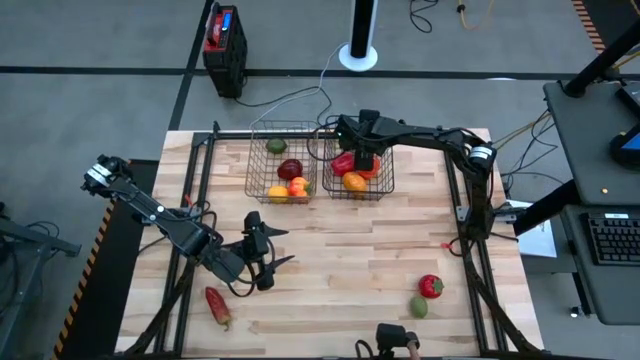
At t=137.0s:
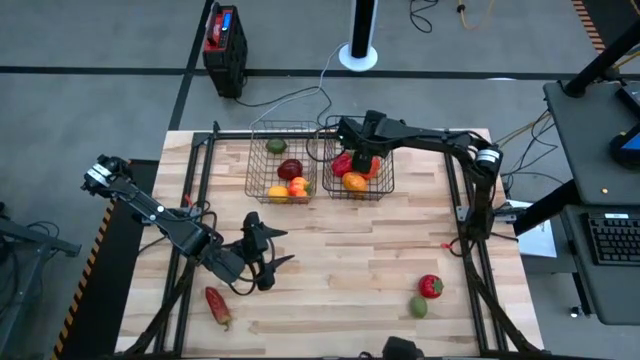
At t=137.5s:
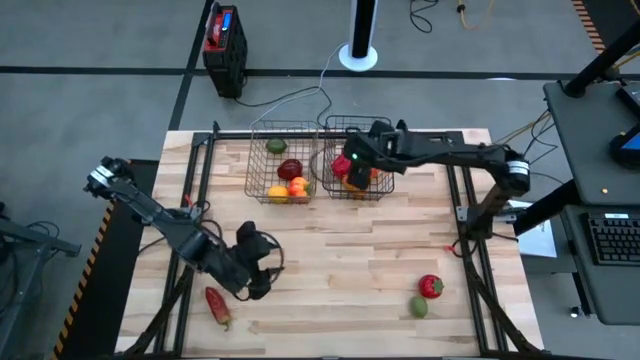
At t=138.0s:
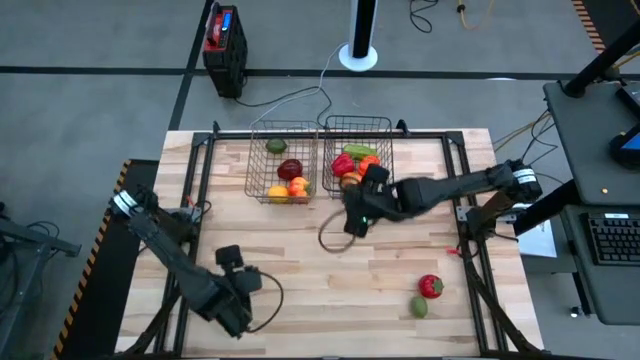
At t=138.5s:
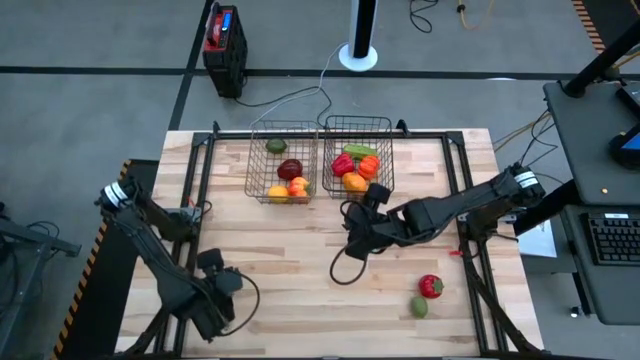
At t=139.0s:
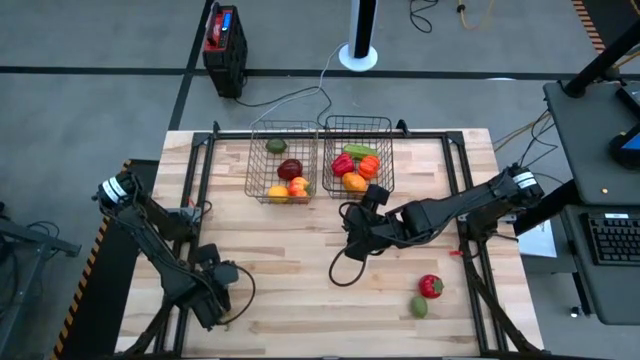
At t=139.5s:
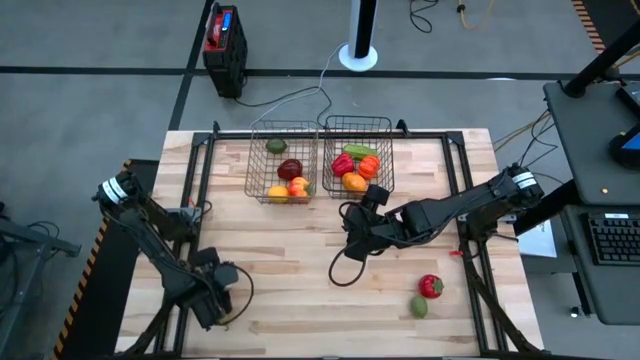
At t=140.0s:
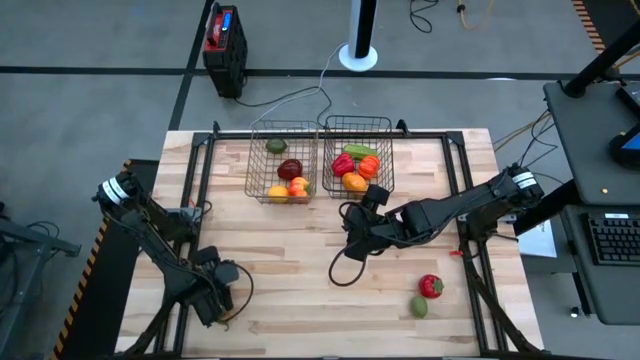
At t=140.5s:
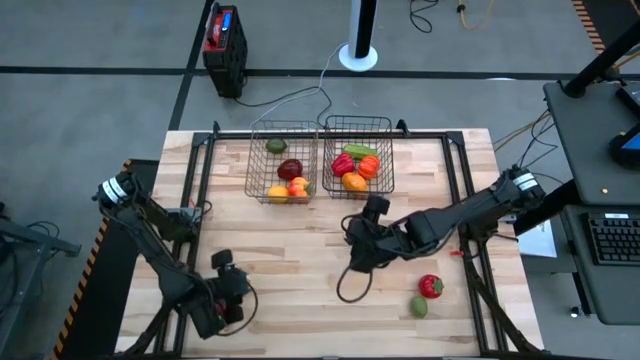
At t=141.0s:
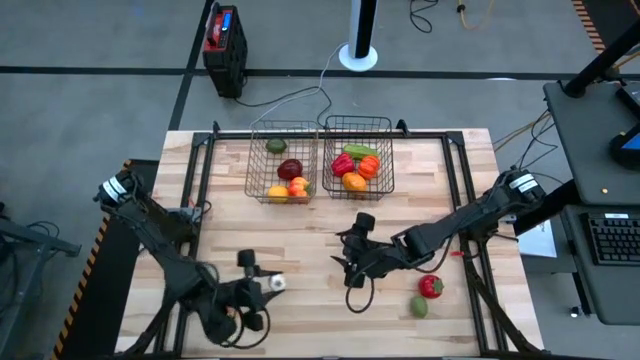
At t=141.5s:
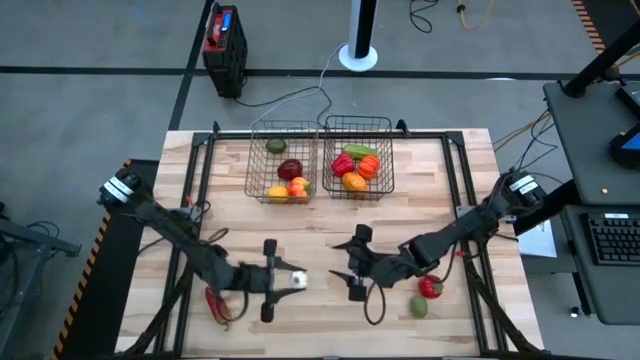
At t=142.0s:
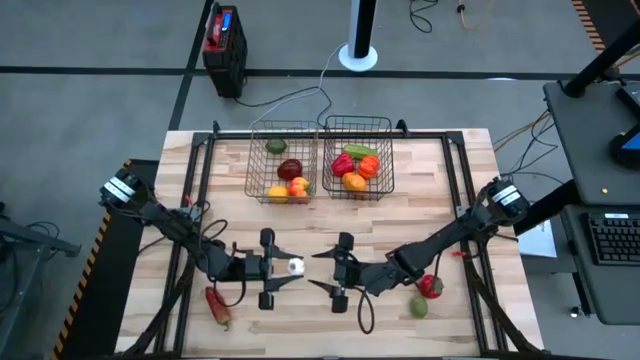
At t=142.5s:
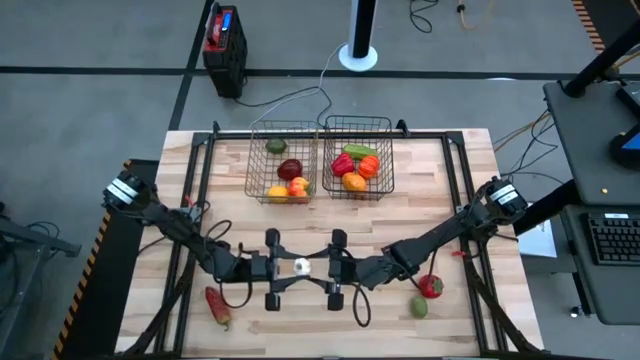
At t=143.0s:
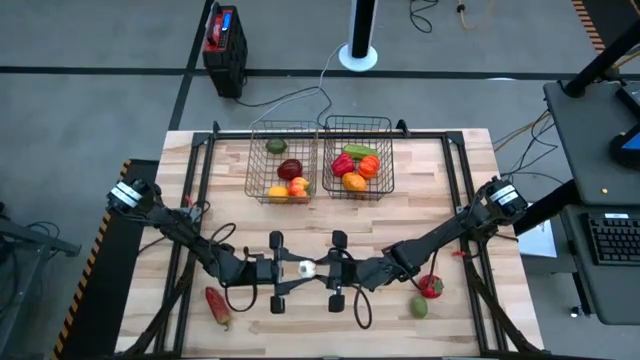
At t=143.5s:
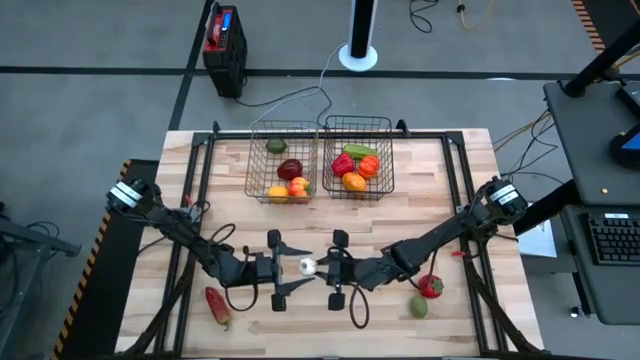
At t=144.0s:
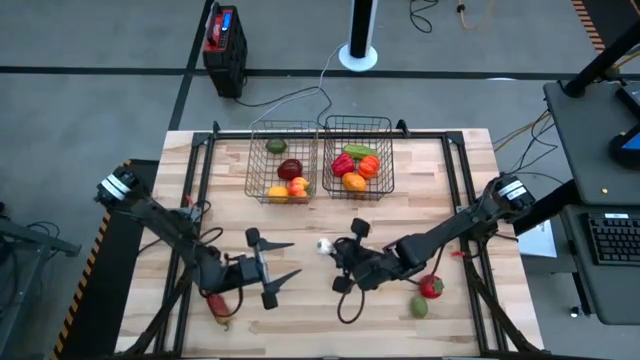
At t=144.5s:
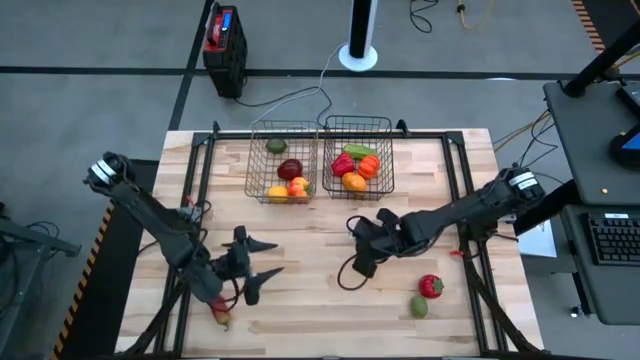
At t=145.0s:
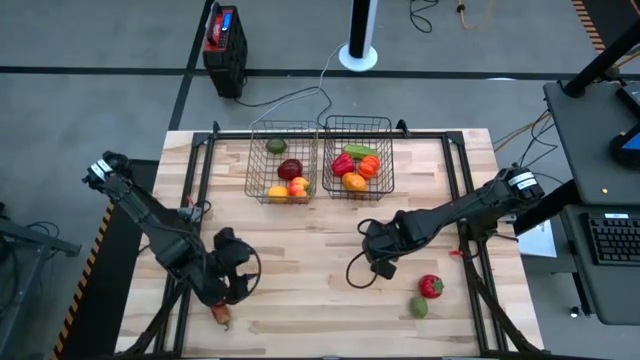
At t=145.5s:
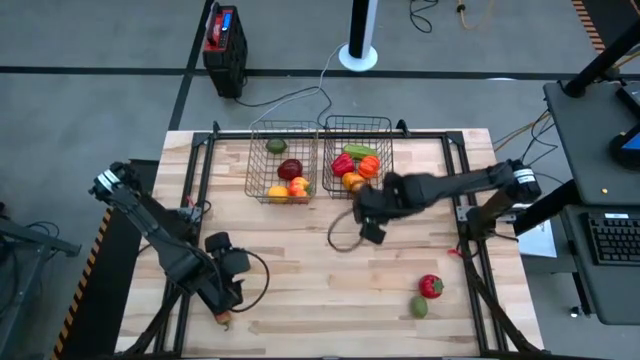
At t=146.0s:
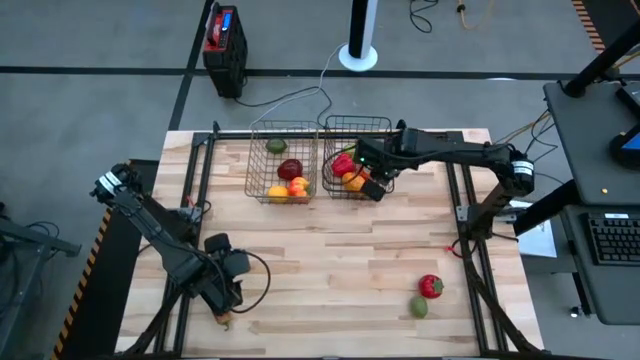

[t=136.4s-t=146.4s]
Task: Sort produce into baskets
Put the white garlic into the black wire basket

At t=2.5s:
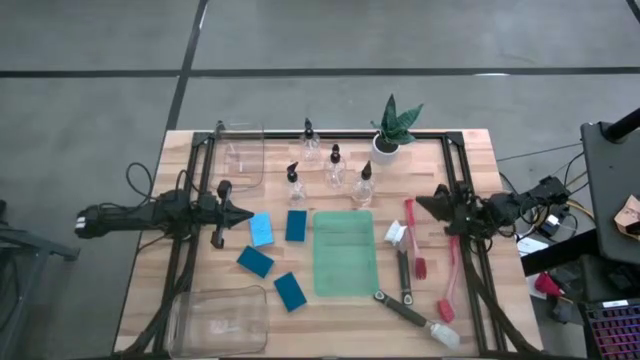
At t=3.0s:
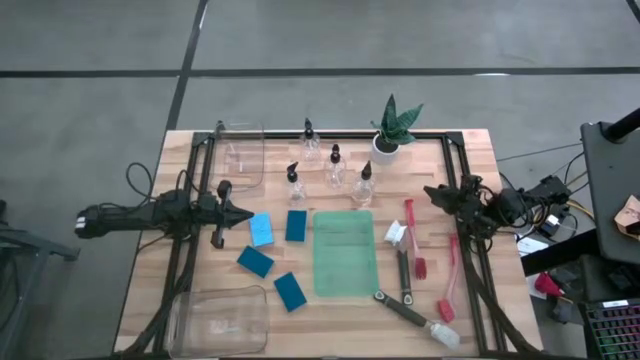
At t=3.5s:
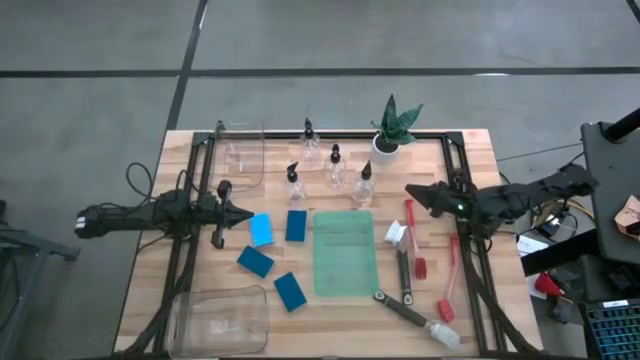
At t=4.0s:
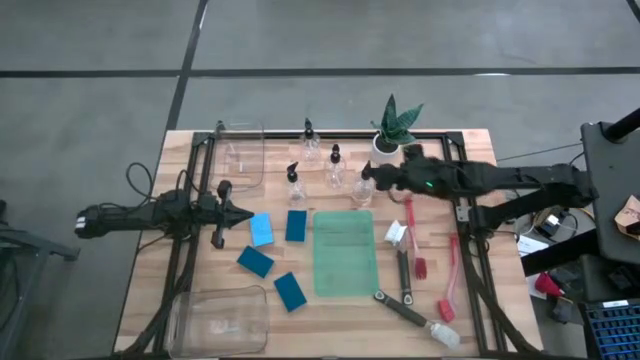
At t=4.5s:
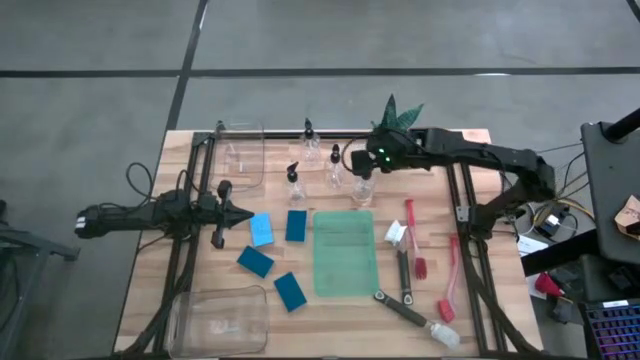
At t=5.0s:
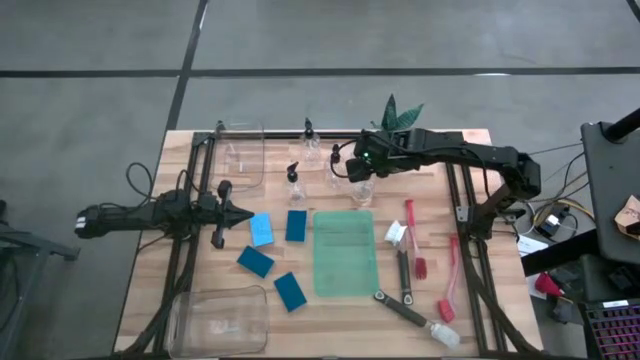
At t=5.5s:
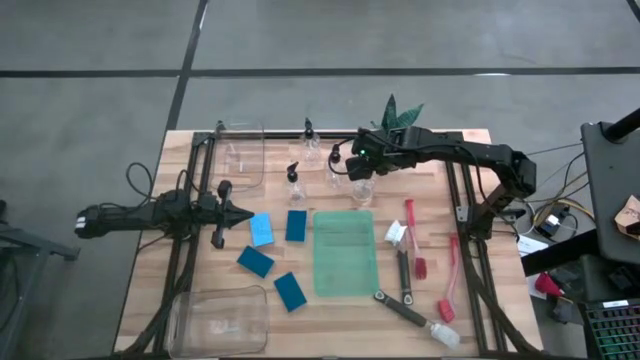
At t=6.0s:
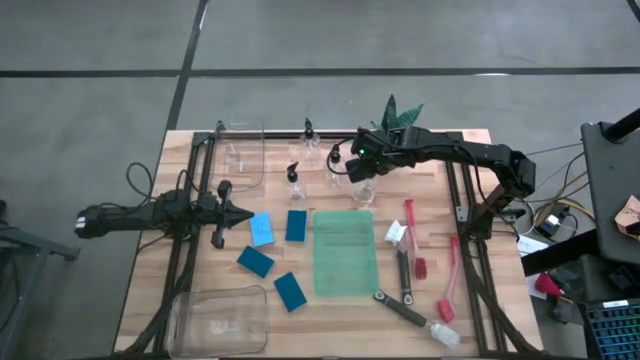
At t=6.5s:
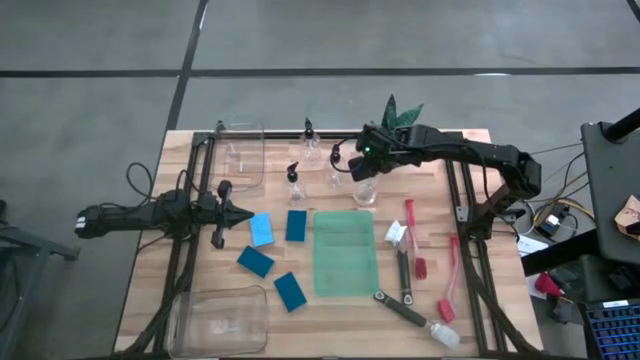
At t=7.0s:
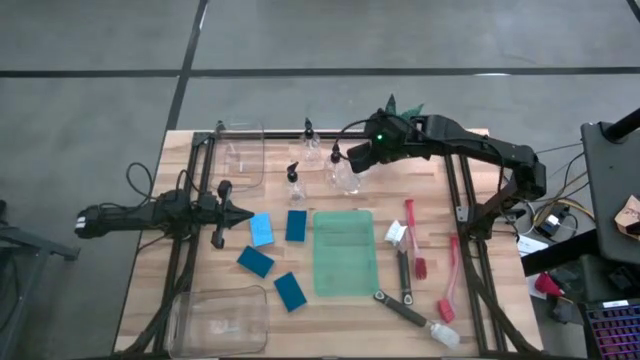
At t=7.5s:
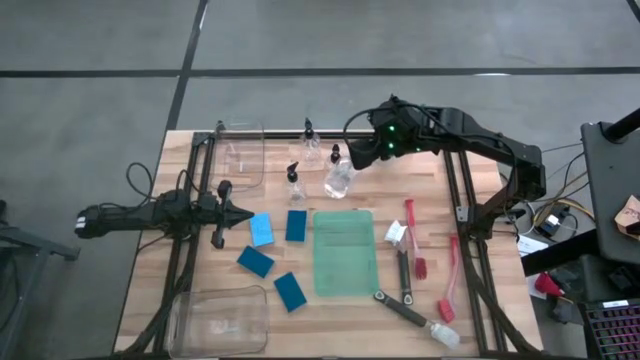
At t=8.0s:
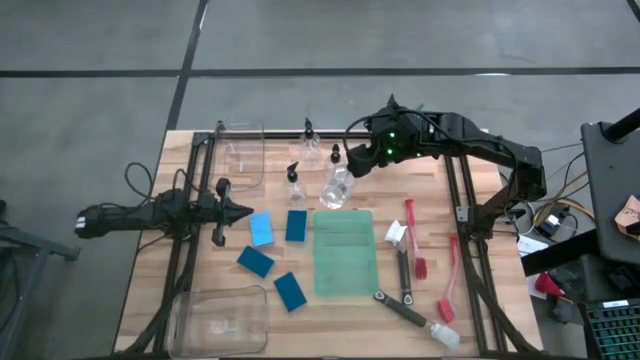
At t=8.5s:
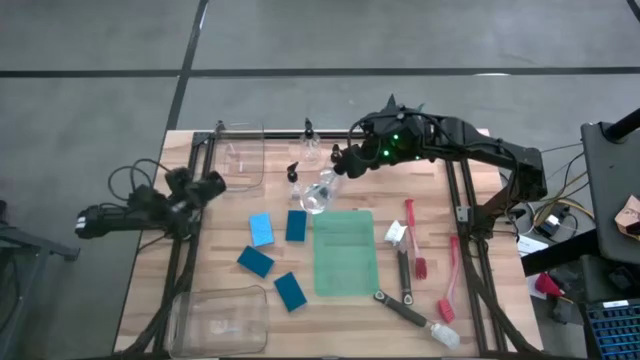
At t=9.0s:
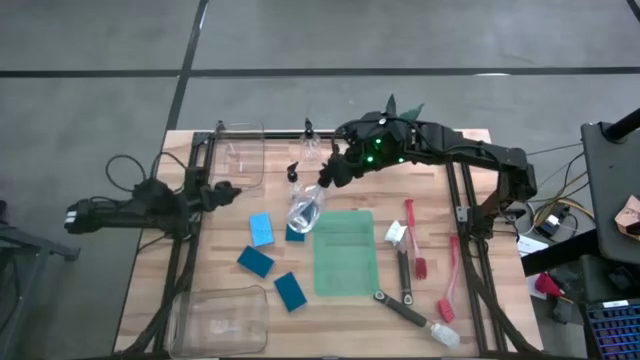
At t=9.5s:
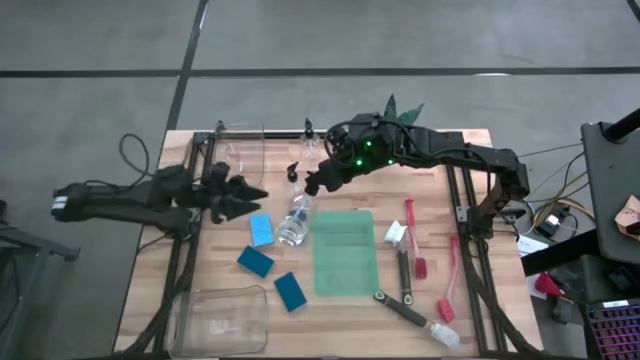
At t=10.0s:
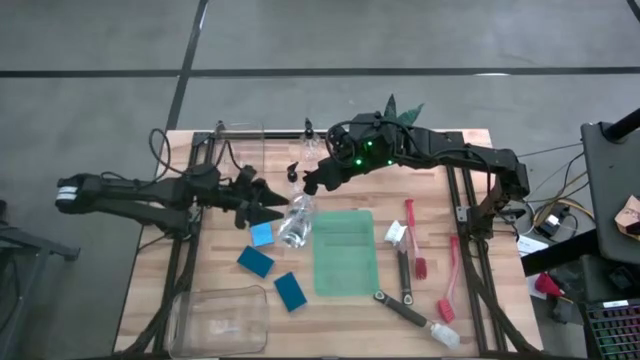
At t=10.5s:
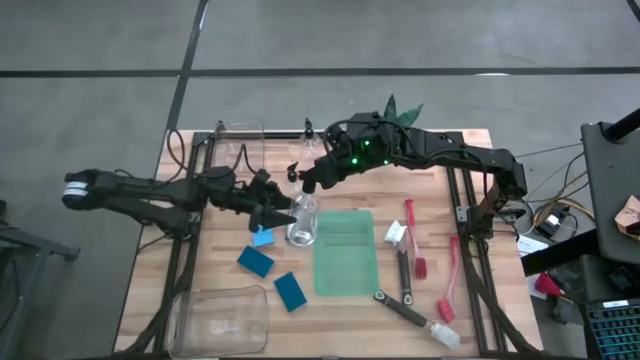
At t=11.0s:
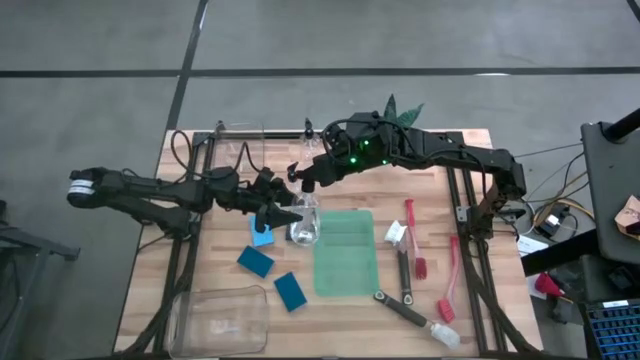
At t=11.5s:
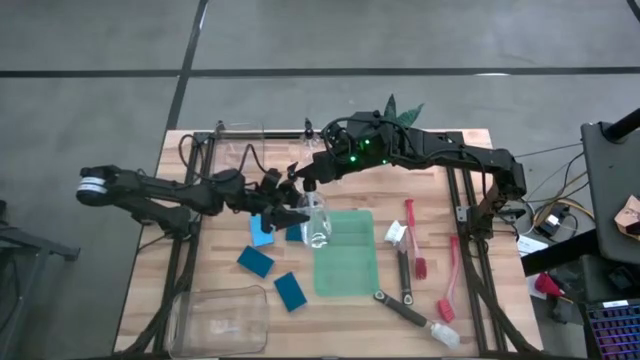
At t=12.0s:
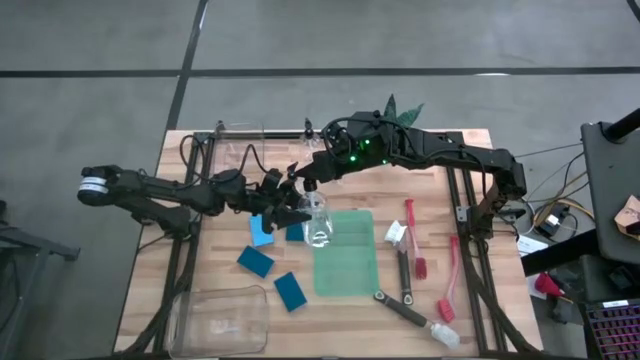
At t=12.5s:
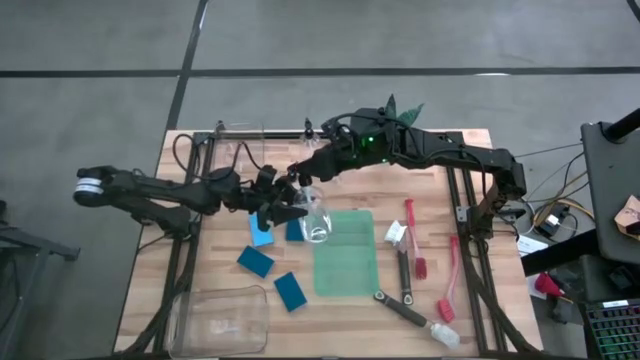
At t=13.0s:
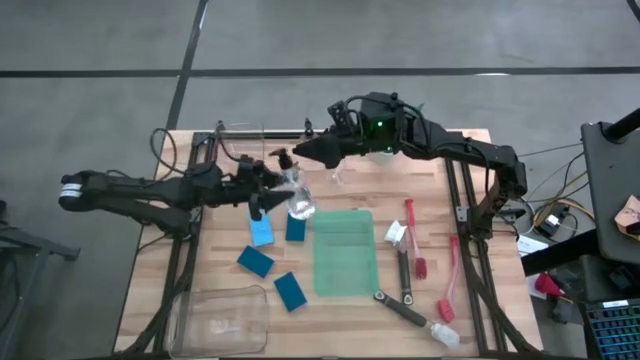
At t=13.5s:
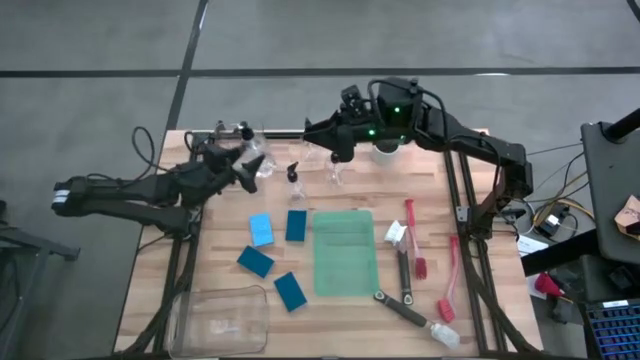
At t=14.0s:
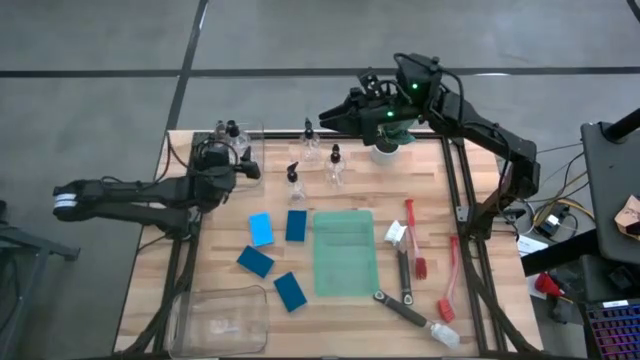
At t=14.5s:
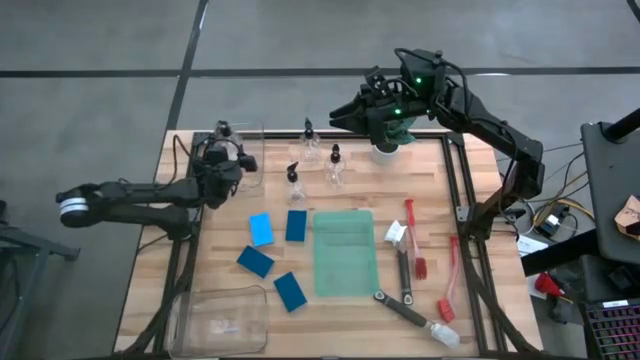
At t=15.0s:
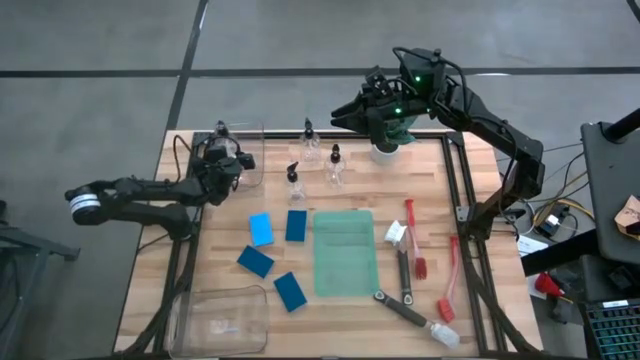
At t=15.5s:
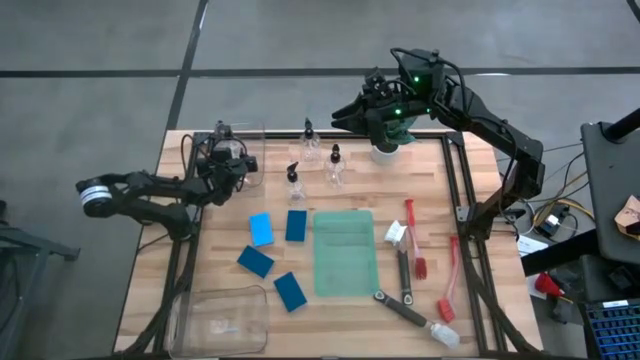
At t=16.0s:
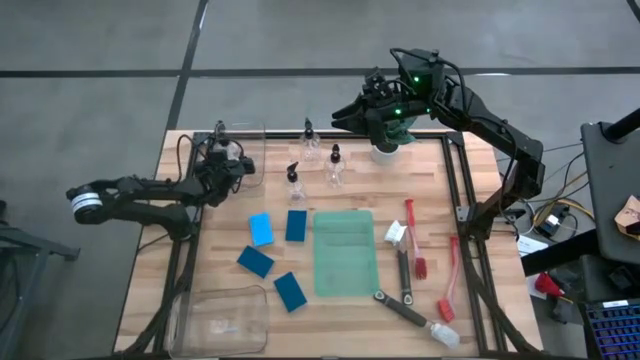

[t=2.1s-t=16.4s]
Task: Pick & Place Kitchen Sink Supplies
Put the transparent soap dispenser into the top transparent bin
